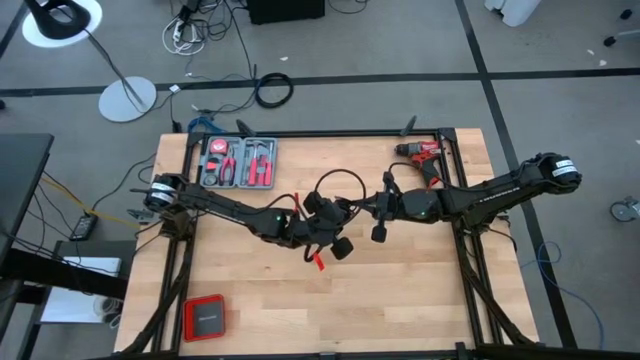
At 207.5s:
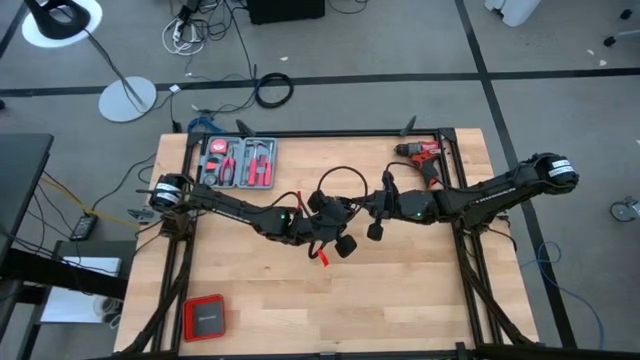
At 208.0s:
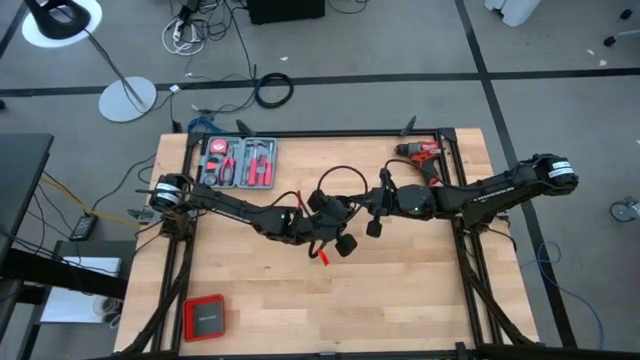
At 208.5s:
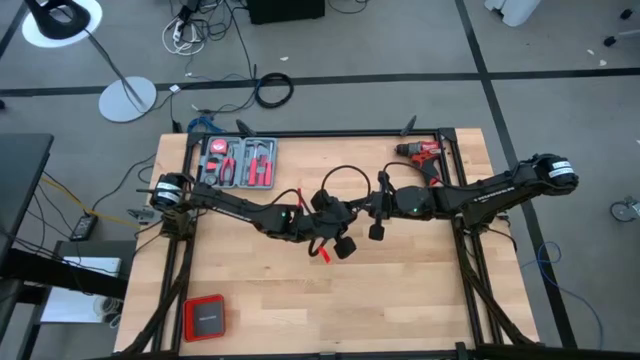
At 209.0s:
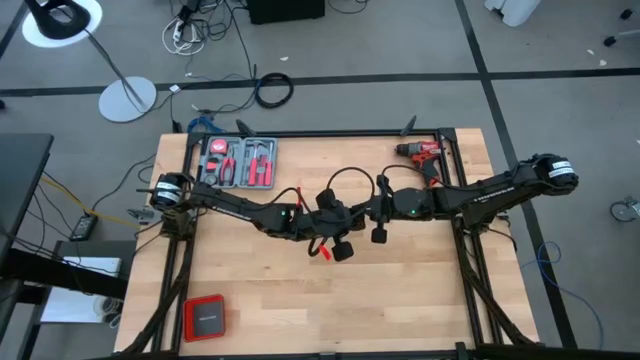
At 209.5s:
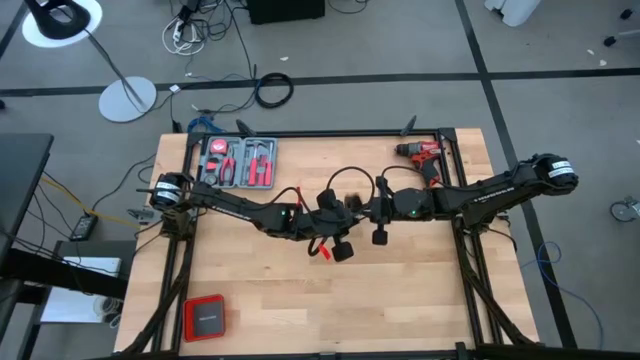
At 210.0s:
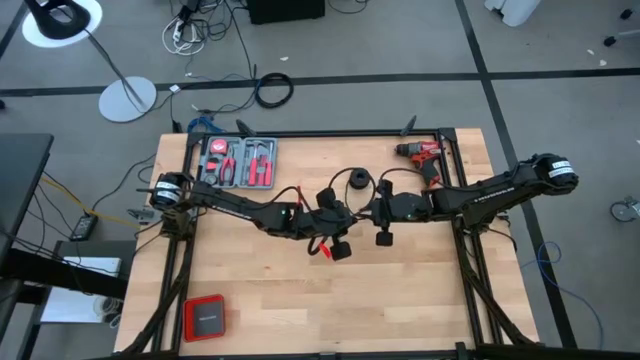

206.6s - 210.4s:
Task: Coil cords
Coil the black wire on the spool

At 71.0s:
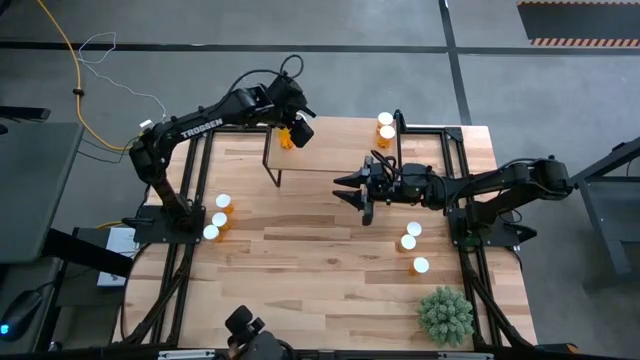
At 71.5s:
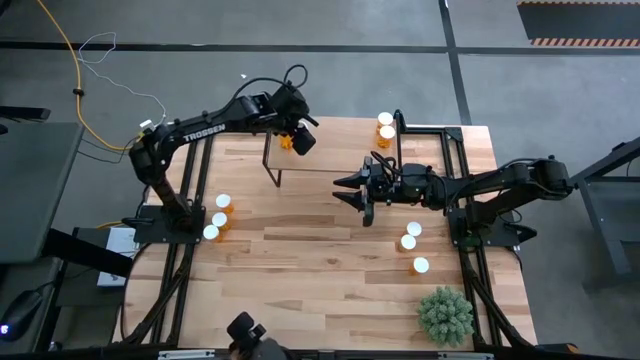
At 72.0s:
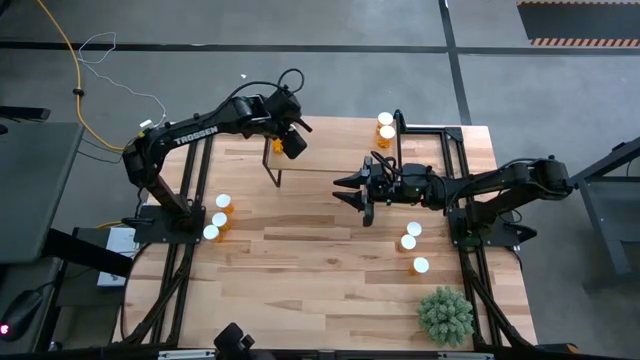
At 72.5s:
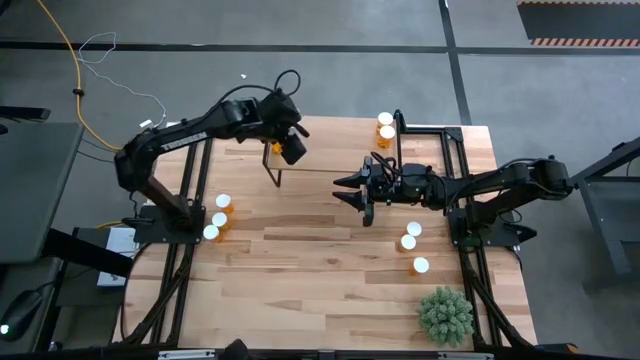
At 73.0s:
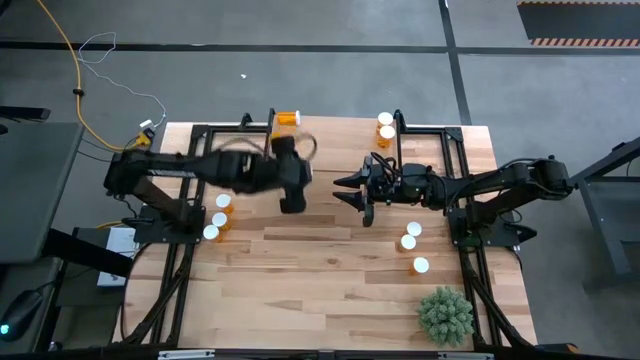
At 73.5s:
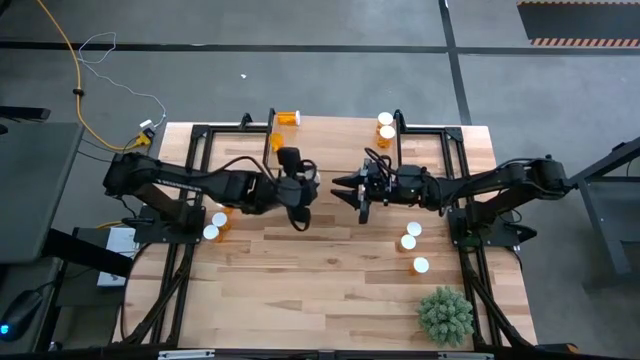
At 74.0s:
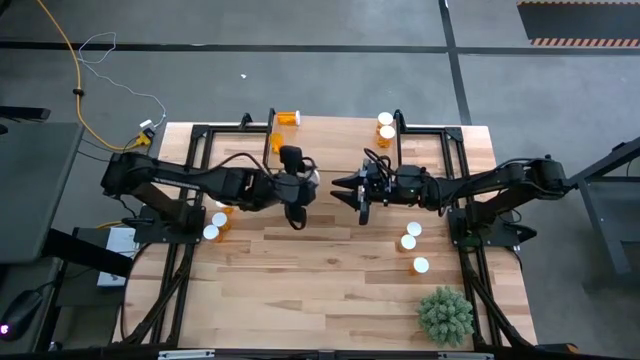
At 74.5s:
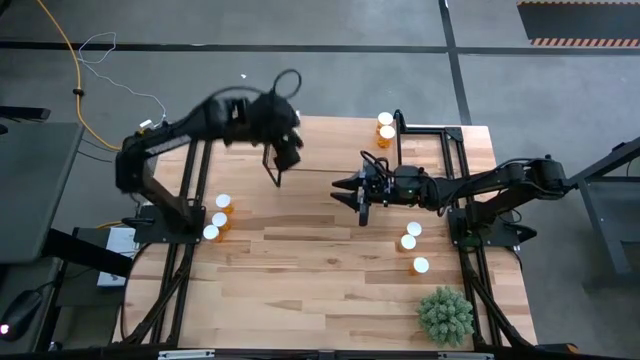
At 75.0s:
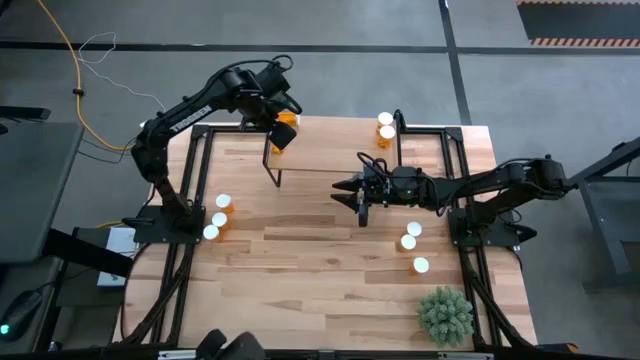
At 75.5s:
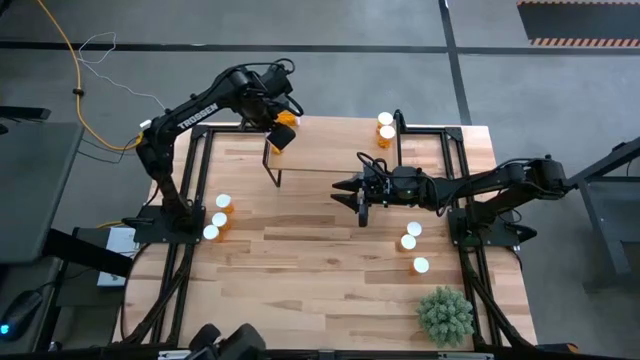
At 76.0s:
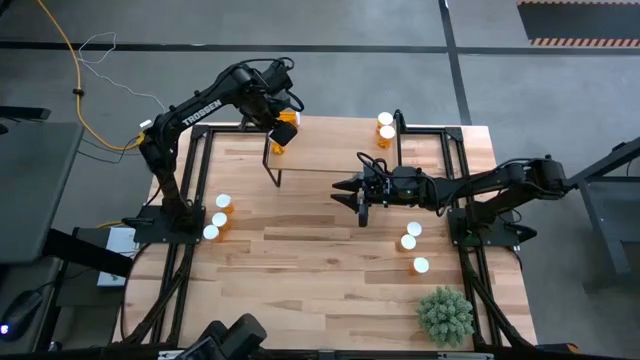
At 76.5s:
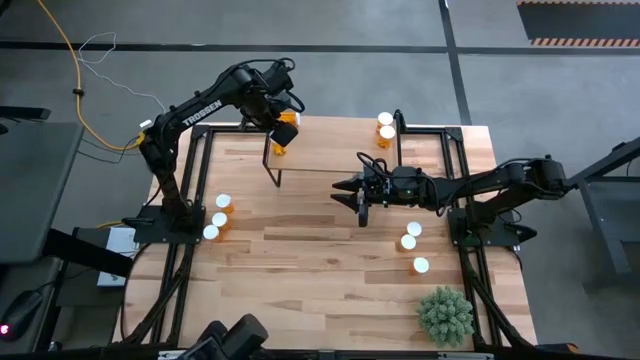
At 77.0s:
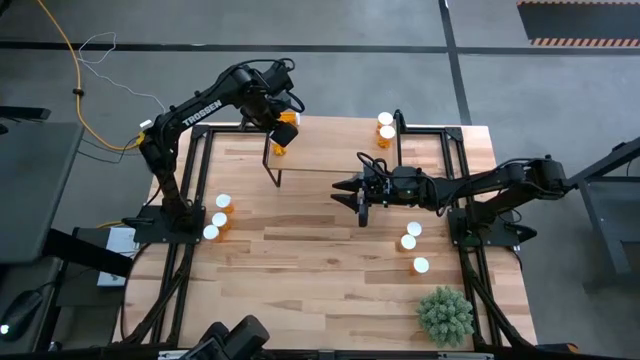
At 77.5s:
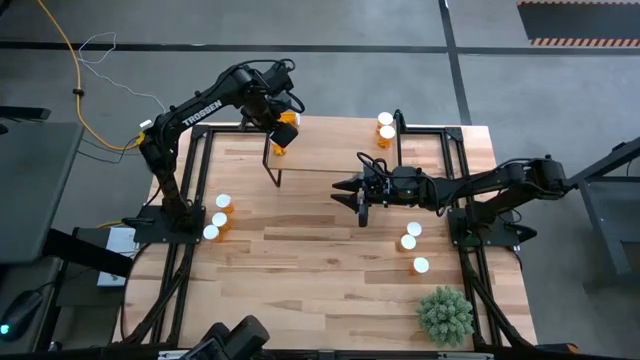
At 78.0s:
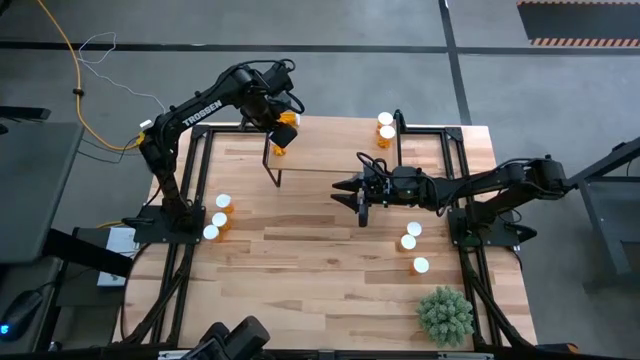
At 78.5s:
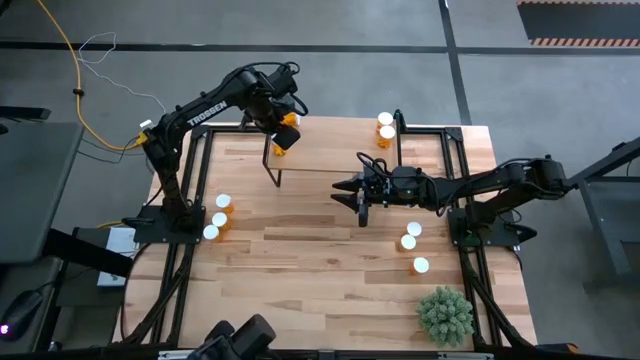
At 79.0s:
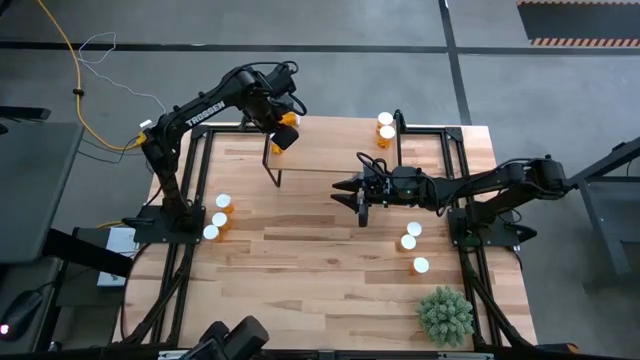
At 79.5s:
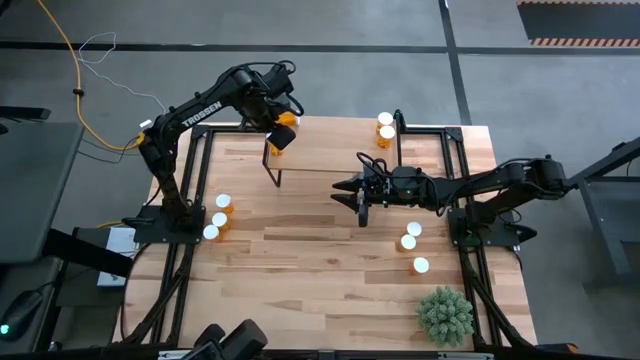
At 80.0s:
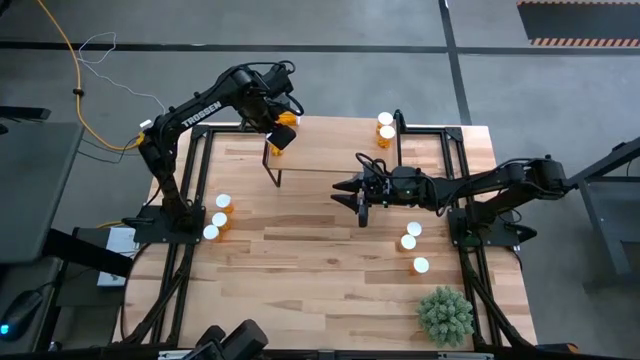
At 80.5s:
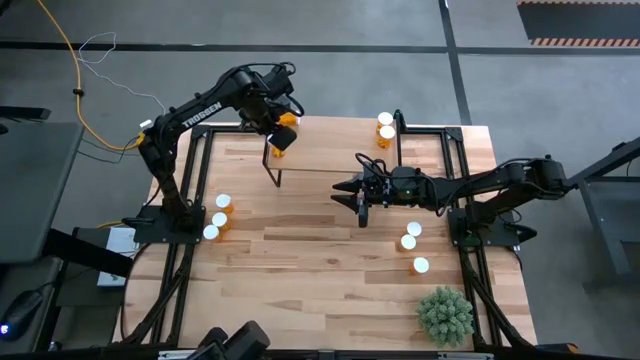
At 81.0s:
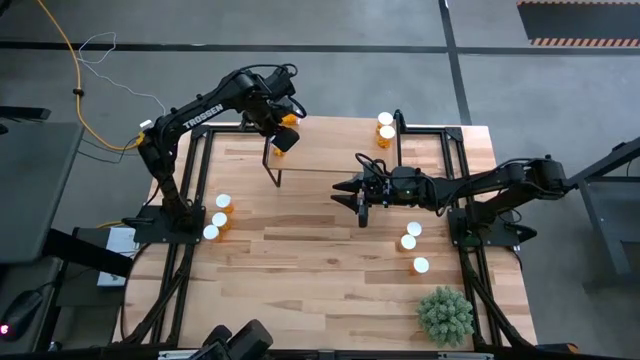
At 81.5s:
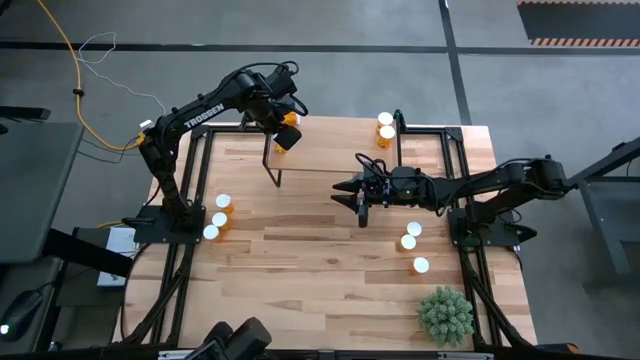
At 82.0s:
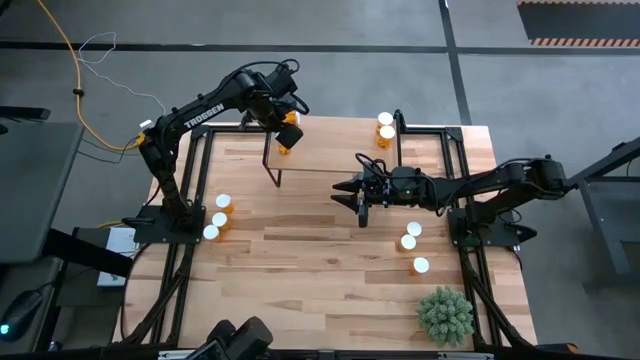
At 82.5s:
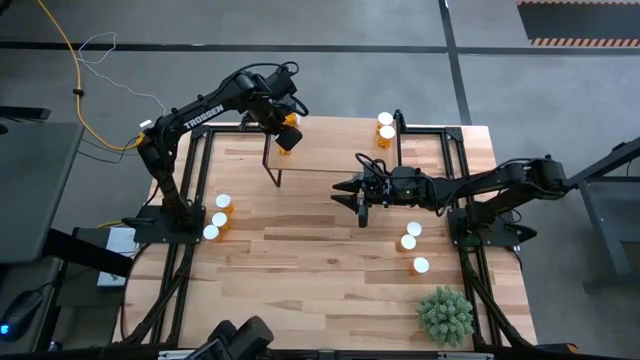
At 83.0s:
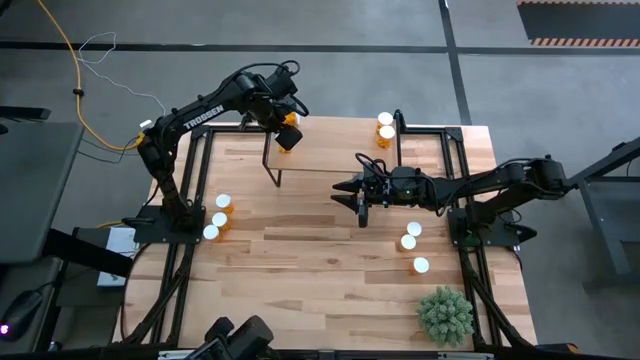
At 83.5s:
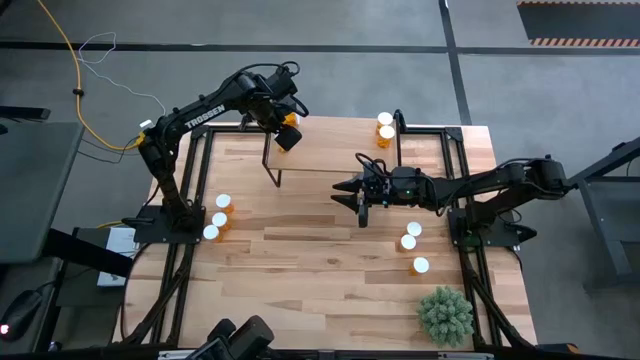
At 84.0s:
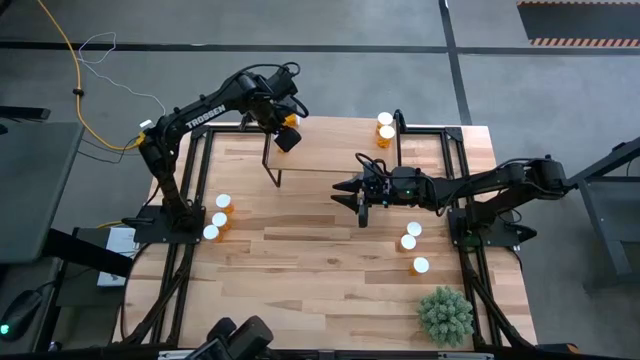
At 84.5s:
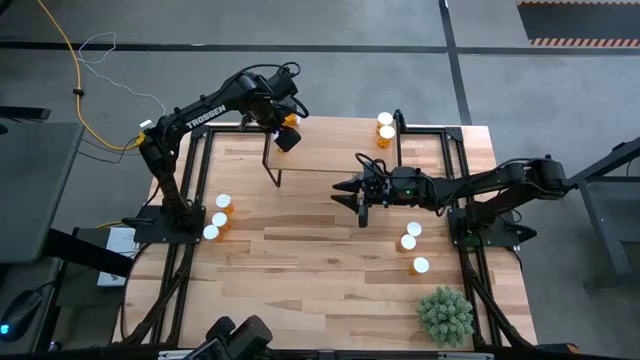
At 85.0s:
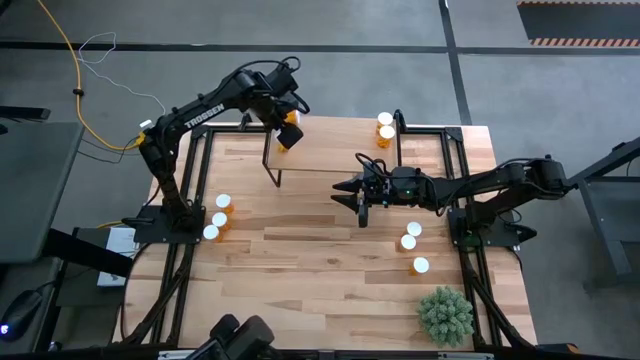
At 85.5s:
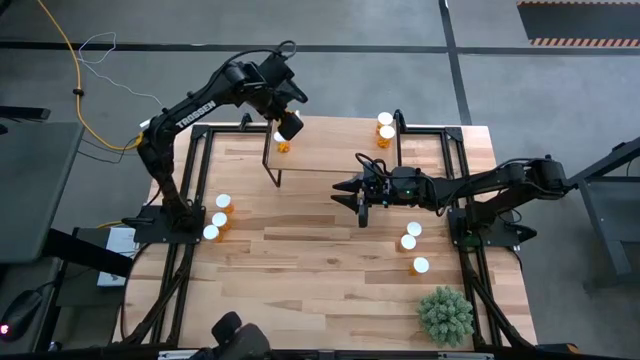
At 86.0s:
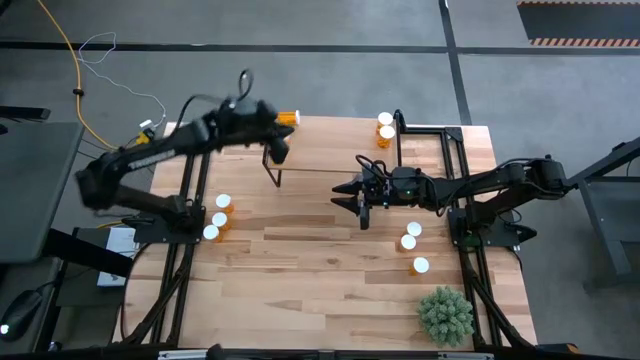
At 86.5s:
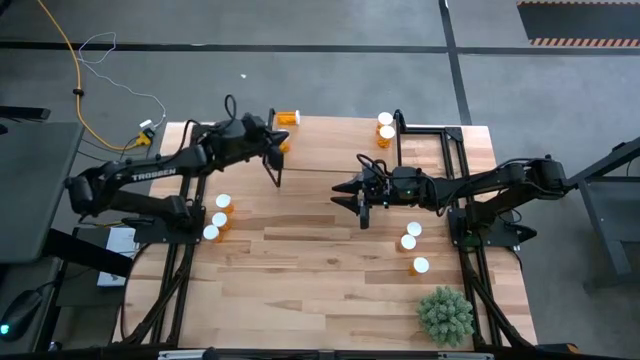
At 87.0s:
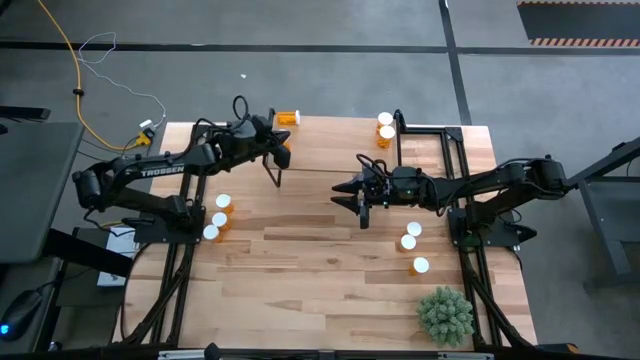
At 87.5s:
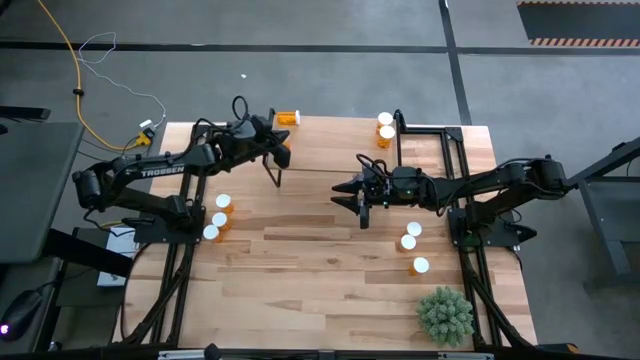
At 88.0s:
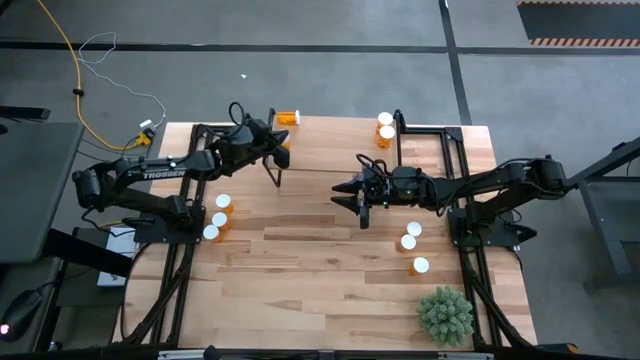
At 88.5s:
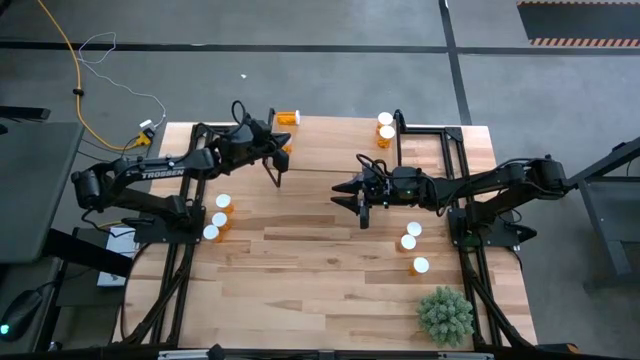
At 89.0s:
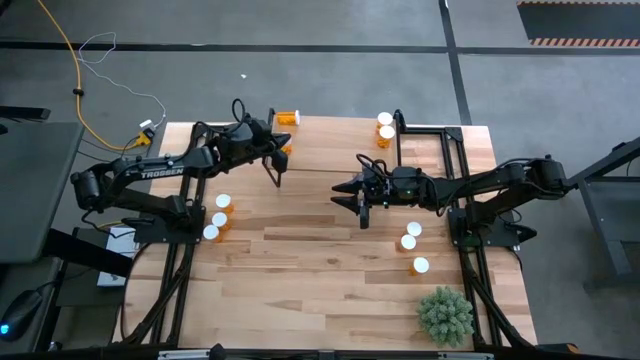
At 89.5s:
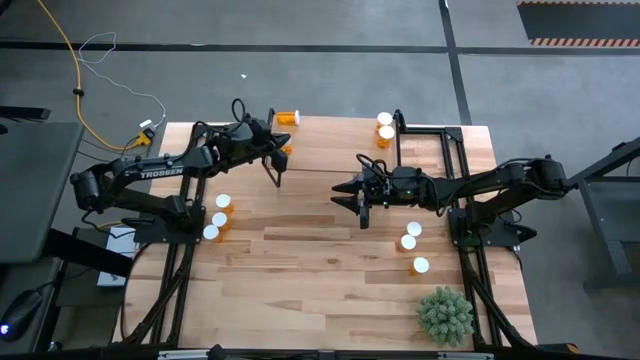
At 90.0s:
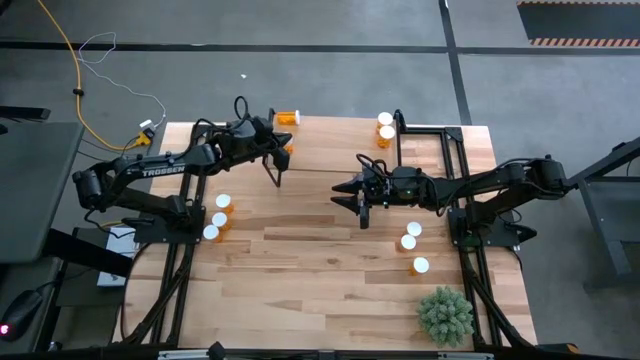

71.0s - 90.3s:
Task: Pick and place medicine bottles onto shelf by color
Put the yellow pill bottle on the shelf
